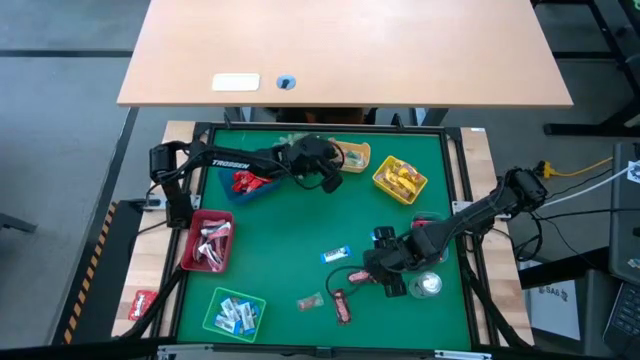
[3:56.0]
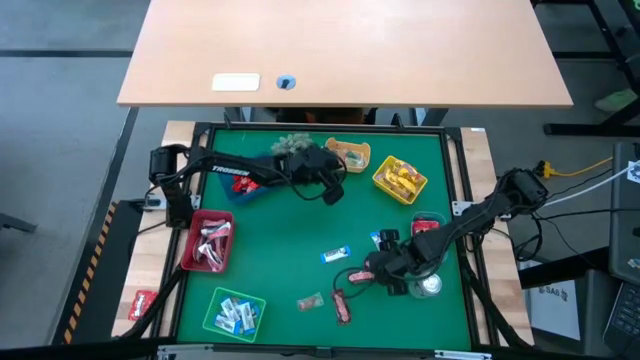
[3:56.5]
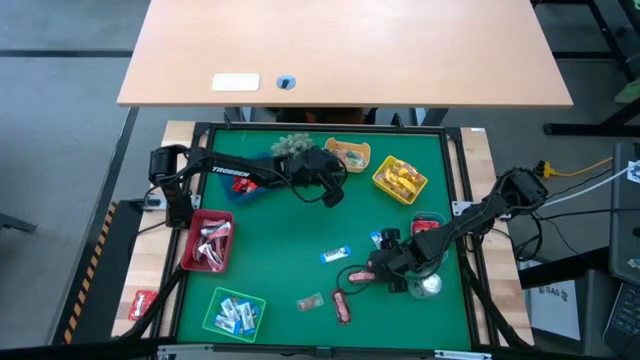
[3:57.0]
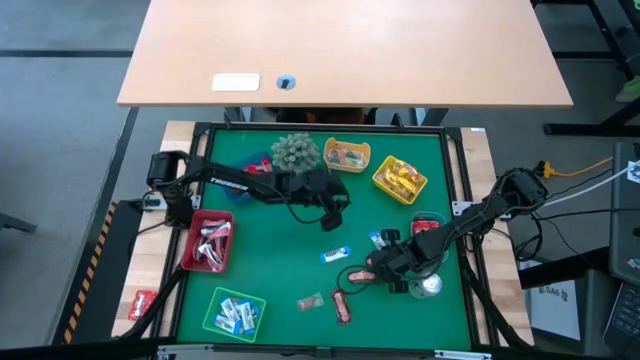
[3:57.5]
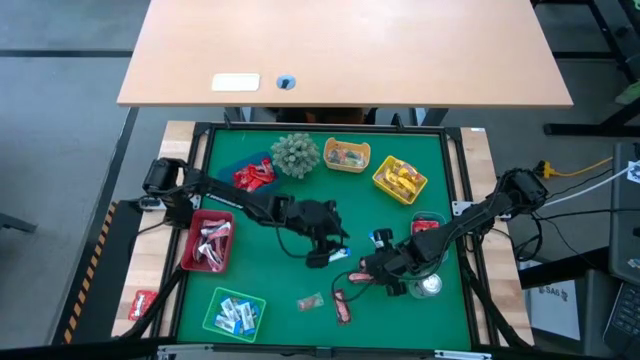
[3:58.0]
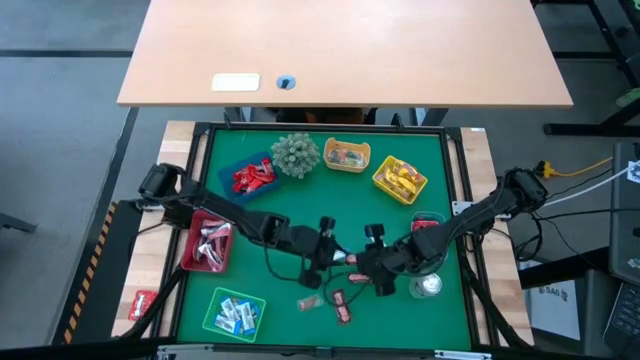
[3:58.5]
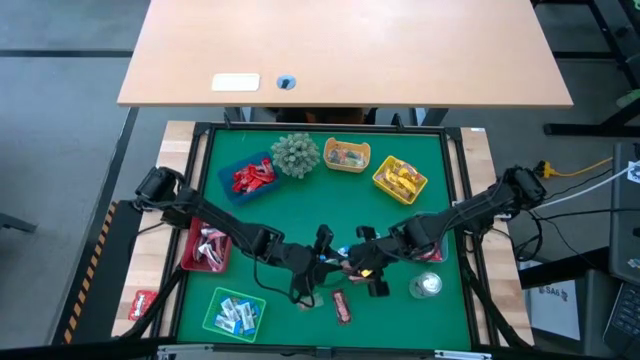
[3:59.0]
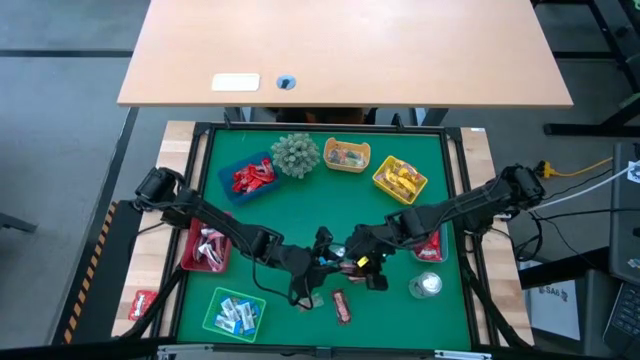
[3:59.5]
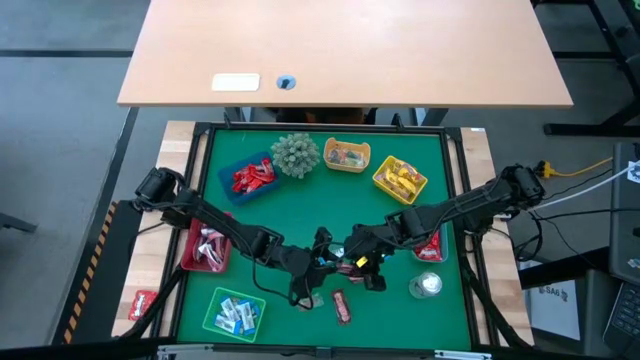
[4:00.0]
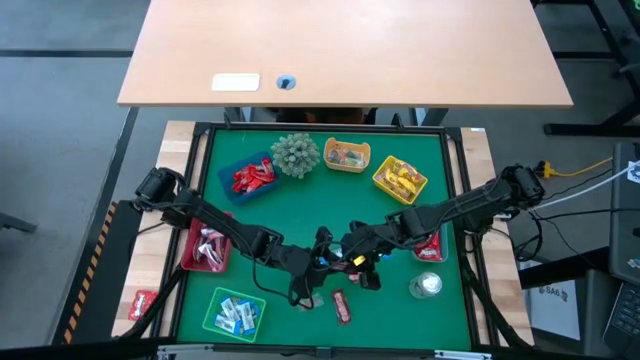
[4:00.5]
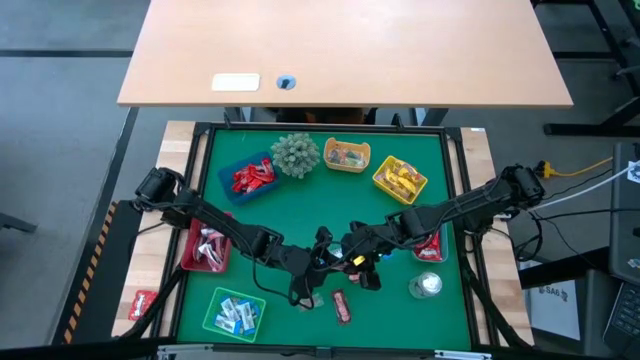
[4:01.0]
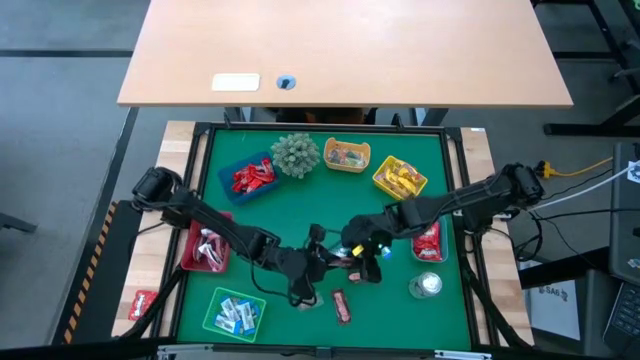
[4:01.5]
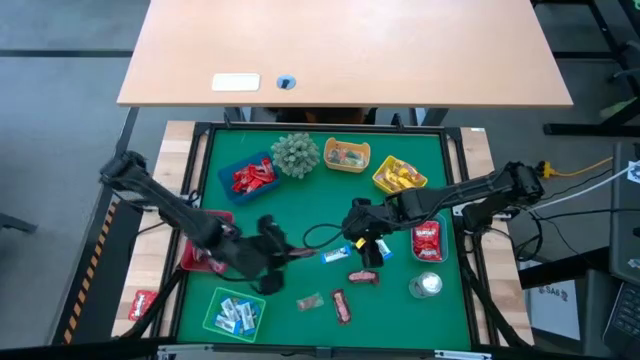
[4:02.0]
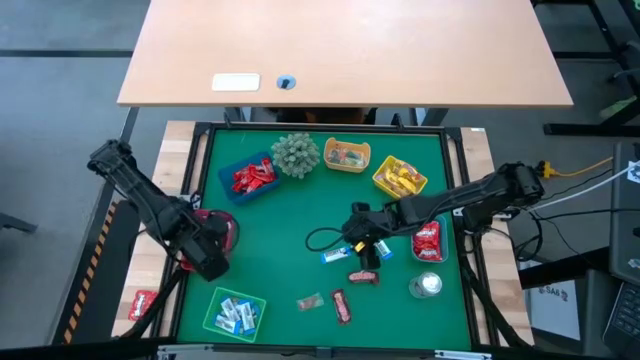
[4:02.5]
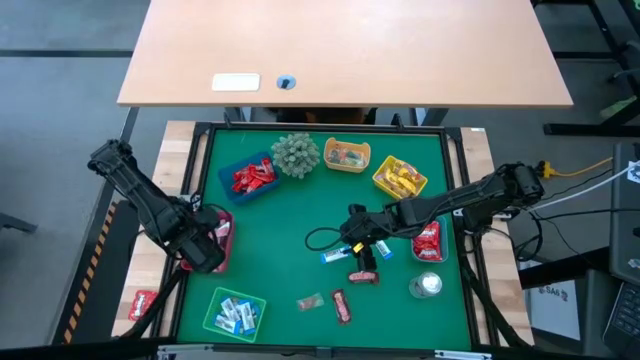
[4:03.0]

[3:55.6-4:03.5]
Task: Sort candy
Put the brown chocolate into the red bin

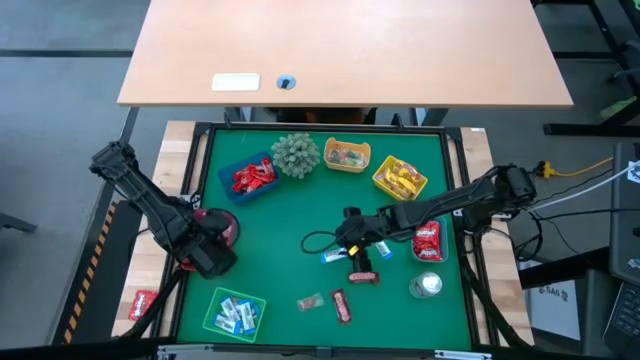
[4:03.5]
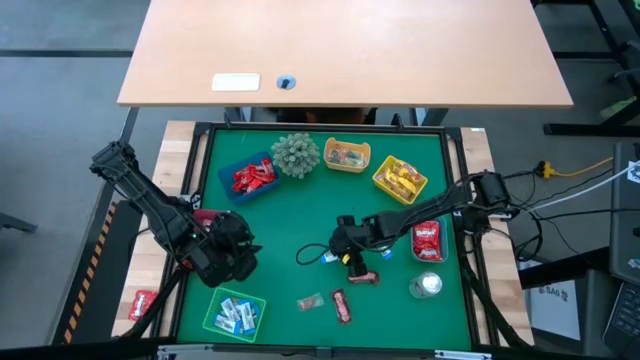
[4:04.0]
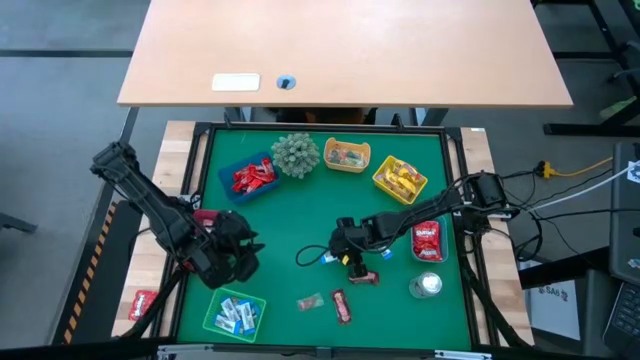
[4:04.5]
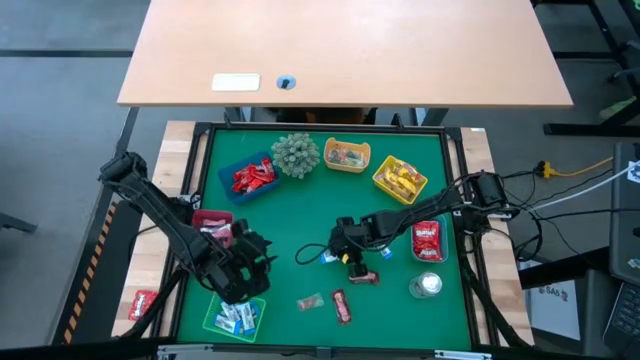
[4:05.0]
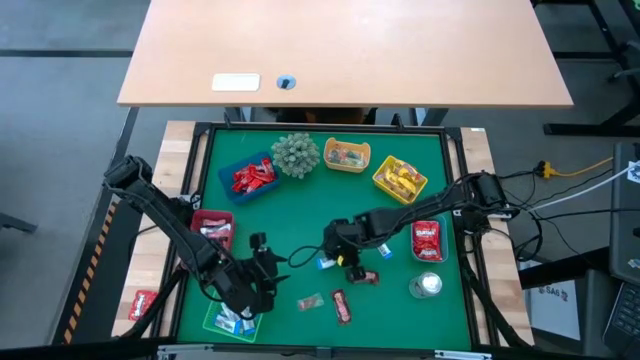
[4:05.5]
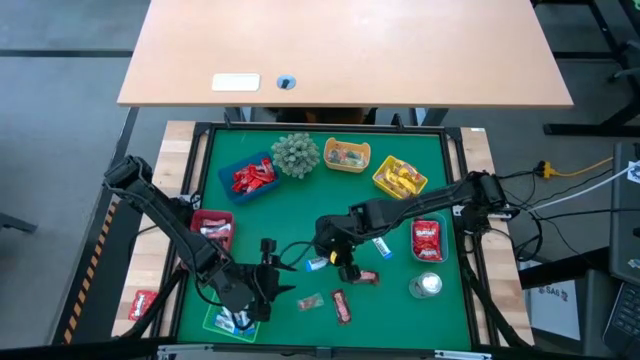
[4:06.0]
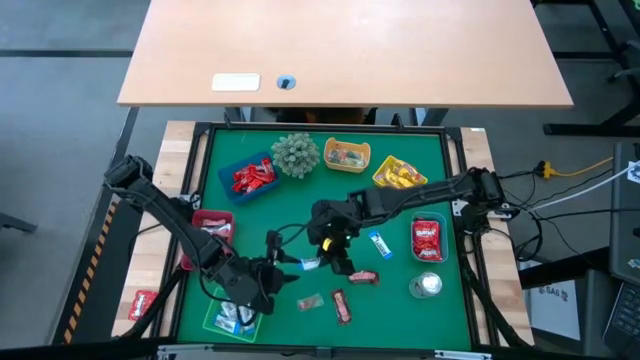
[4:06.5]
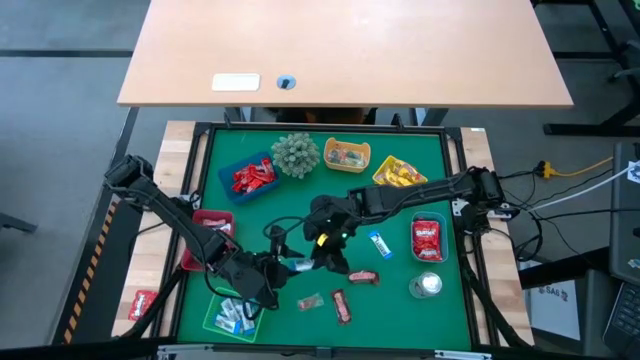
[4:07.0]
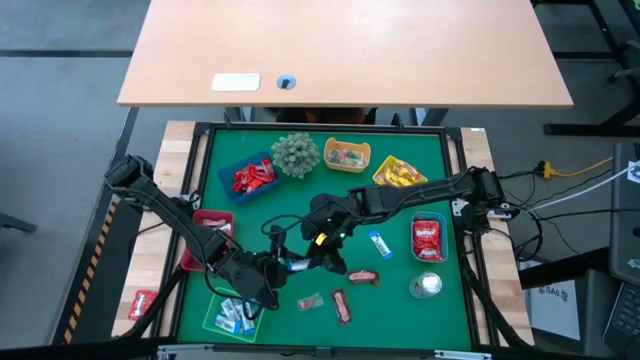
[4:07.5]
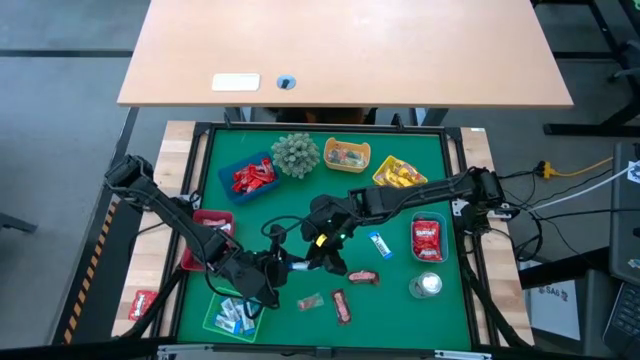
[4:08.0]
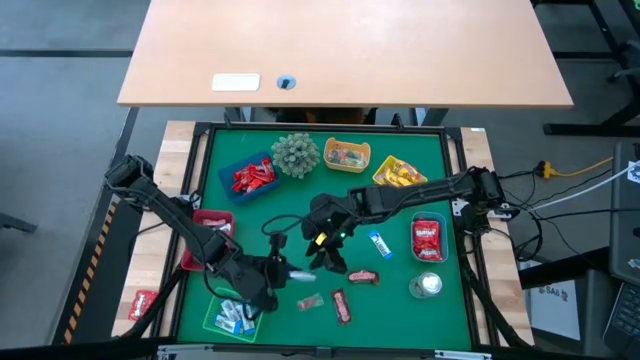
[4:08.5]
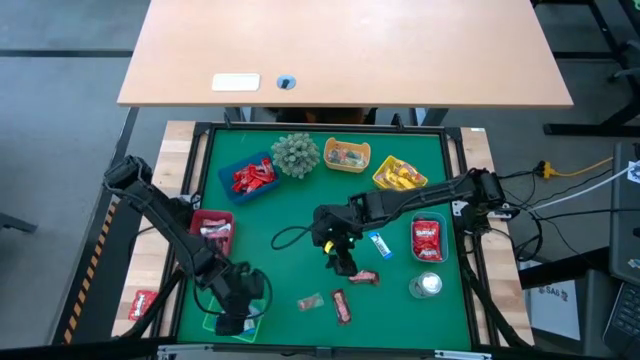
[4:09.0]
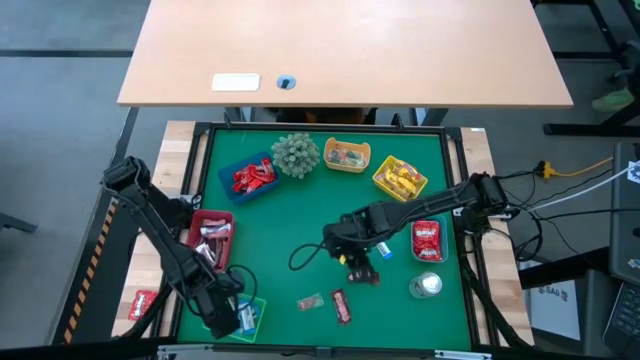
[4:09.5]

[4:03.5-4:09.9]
Put the white-blue chocolate into the green bin

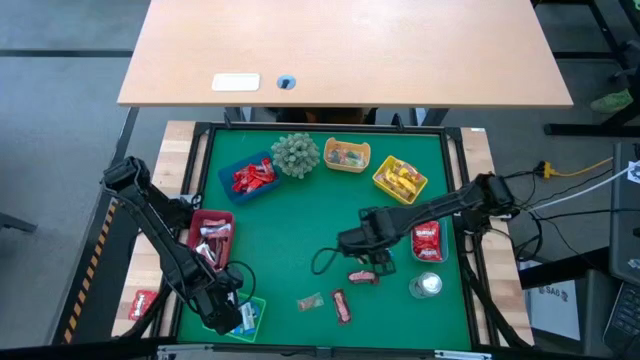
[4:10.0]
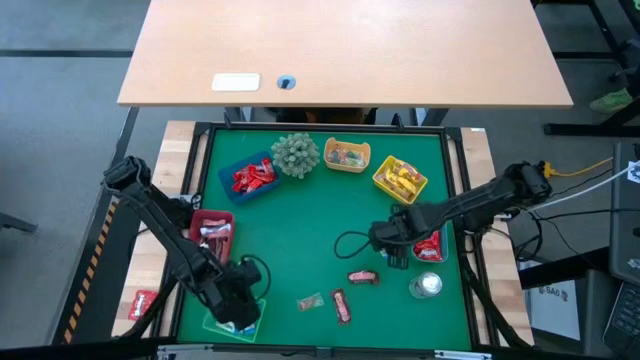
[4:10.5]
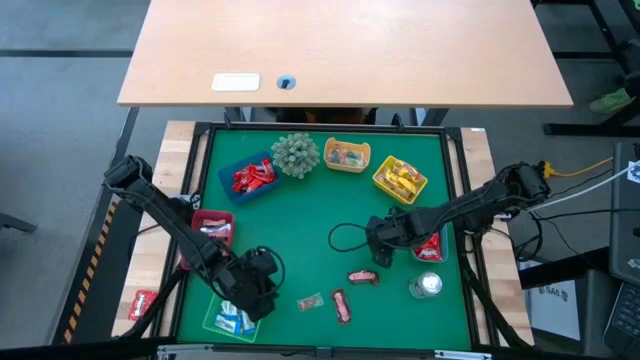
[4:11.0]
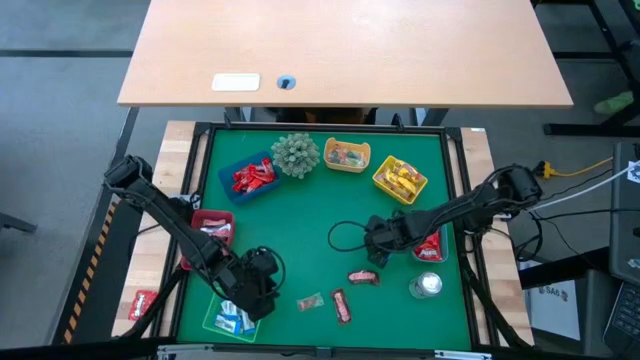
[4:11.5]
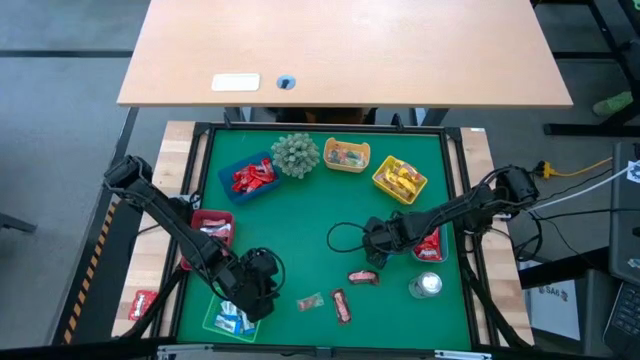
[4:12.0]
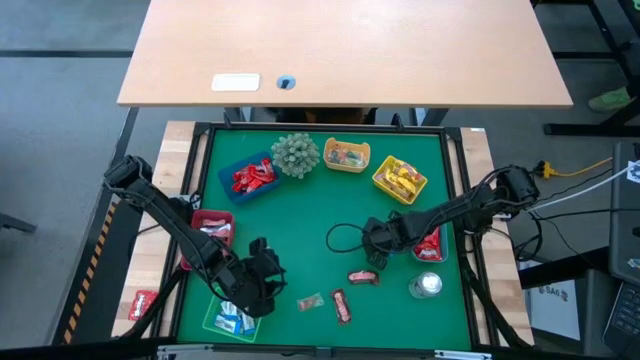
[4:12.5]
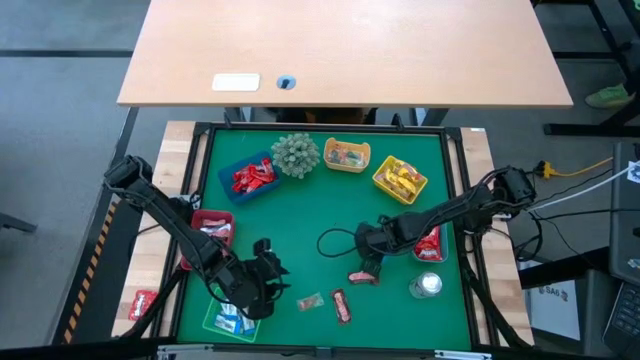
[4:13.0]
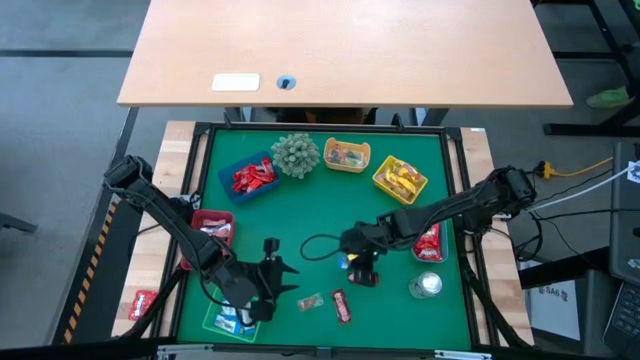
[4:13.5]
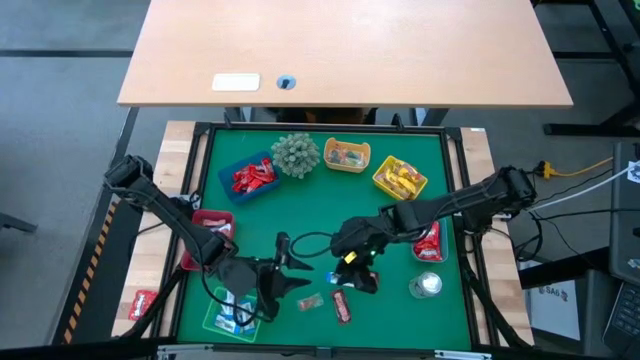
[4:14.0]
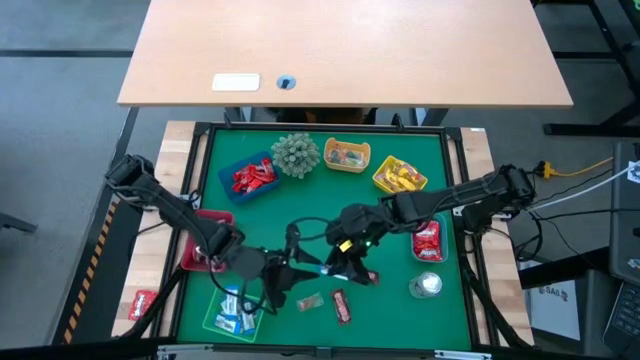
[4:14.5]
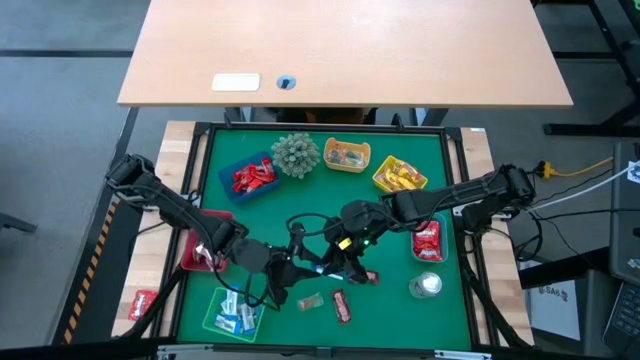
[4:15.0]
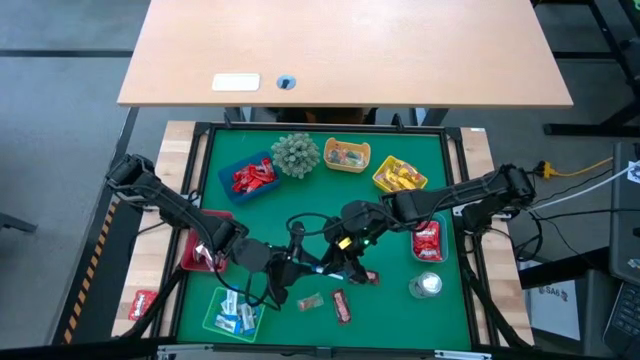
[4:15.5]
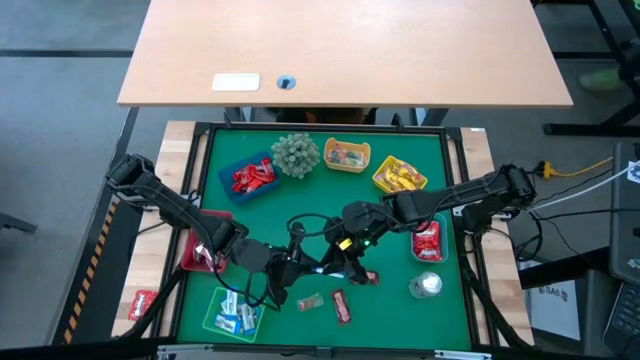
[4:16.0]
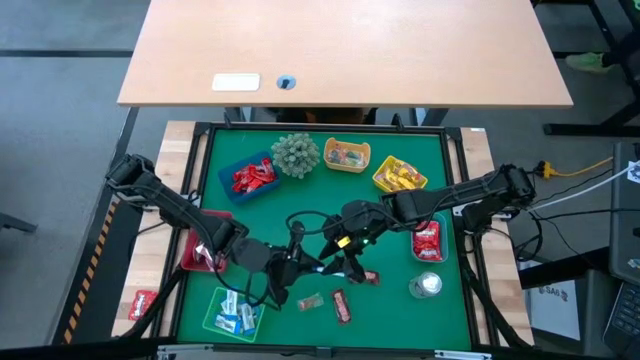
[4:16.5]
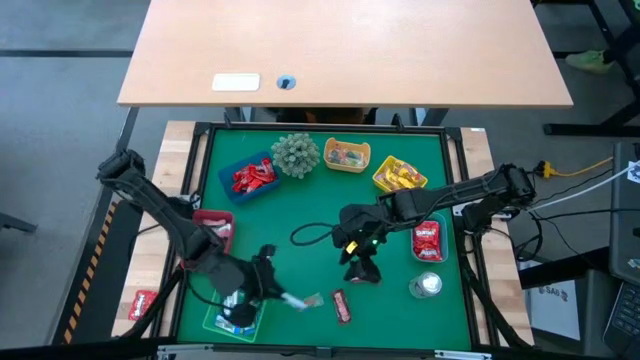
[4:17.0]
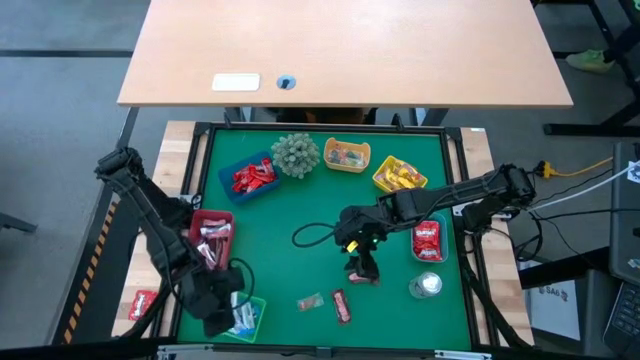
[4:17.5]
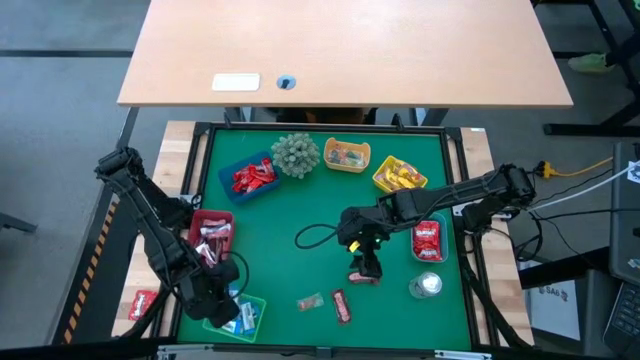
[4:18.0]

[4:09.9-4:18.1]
Put the white-blue chocolate into the green bin
